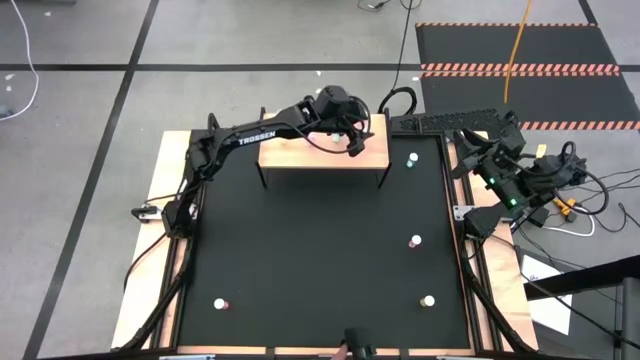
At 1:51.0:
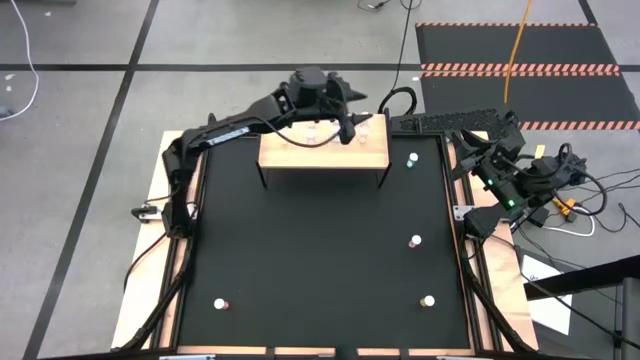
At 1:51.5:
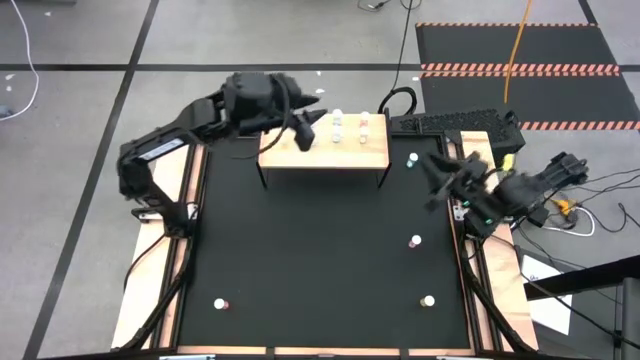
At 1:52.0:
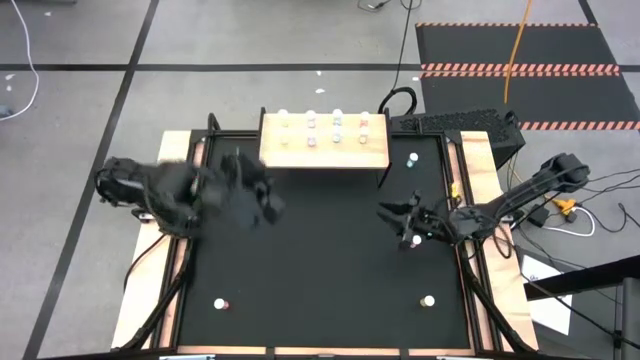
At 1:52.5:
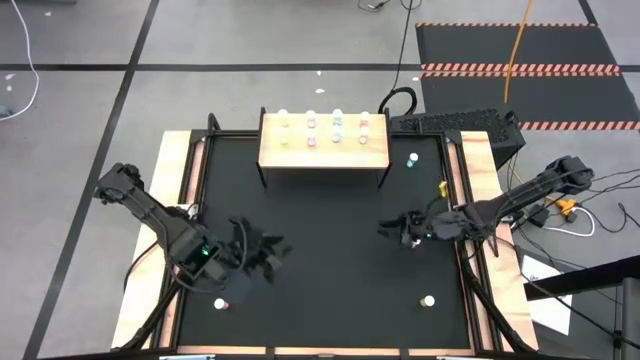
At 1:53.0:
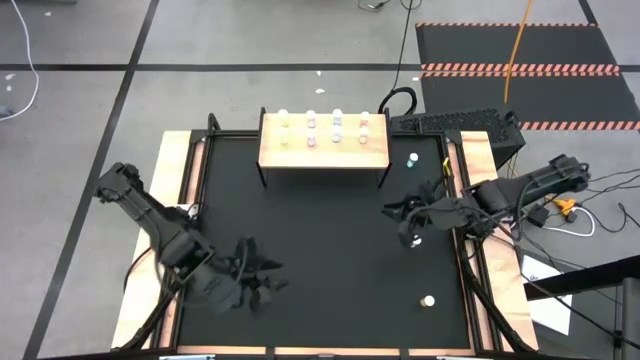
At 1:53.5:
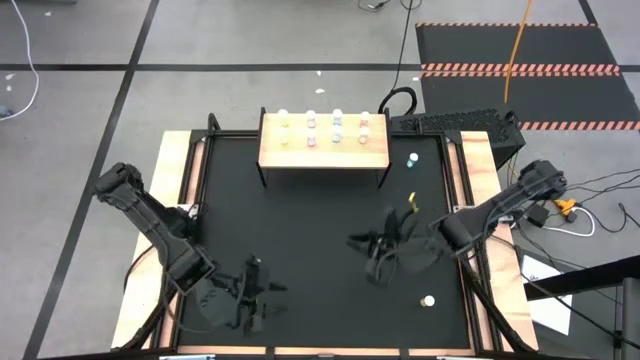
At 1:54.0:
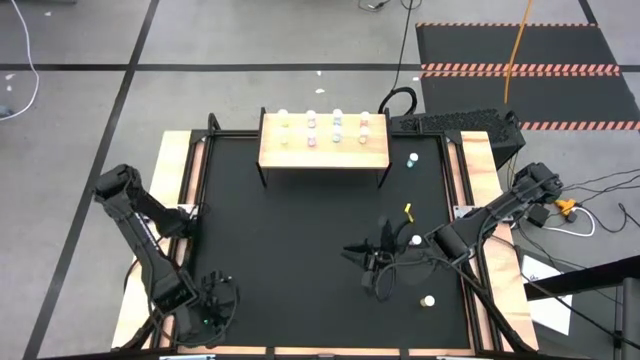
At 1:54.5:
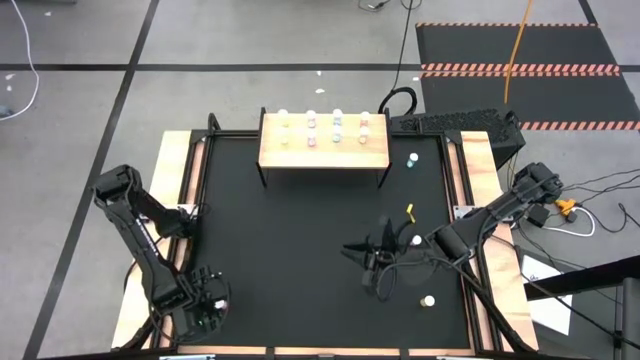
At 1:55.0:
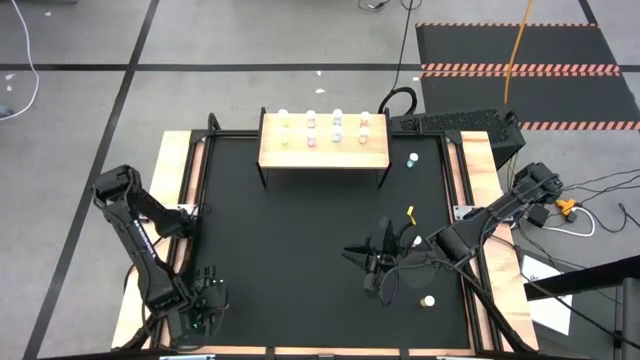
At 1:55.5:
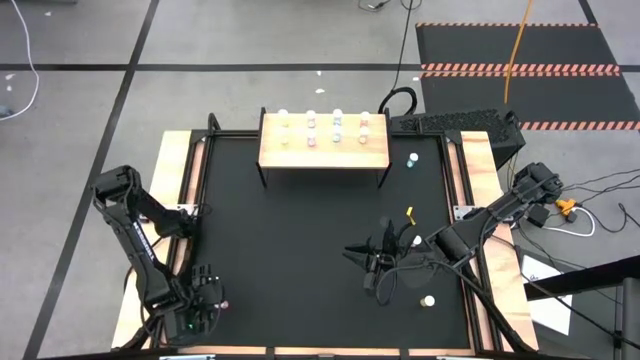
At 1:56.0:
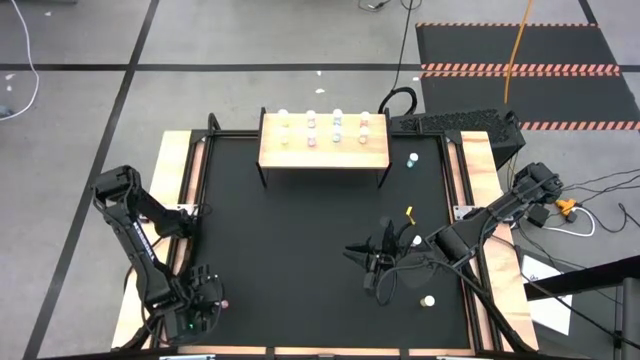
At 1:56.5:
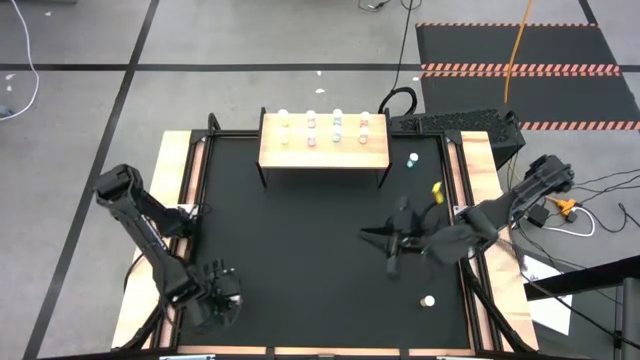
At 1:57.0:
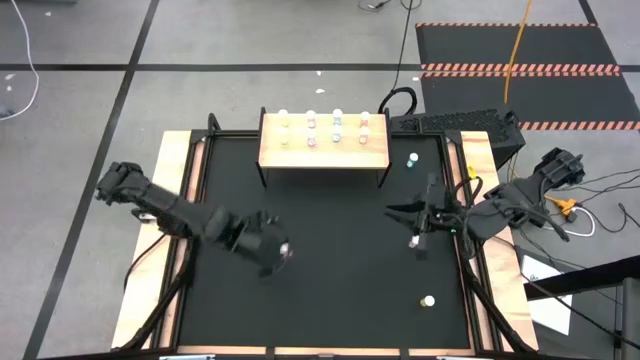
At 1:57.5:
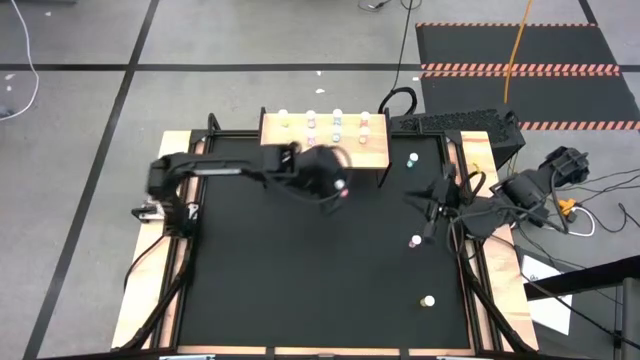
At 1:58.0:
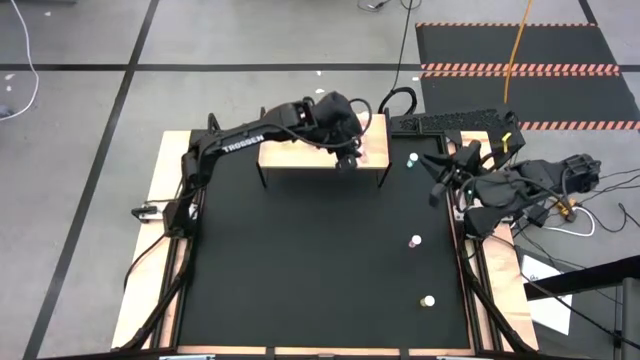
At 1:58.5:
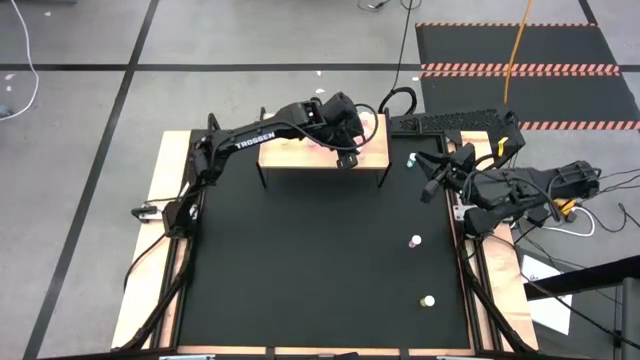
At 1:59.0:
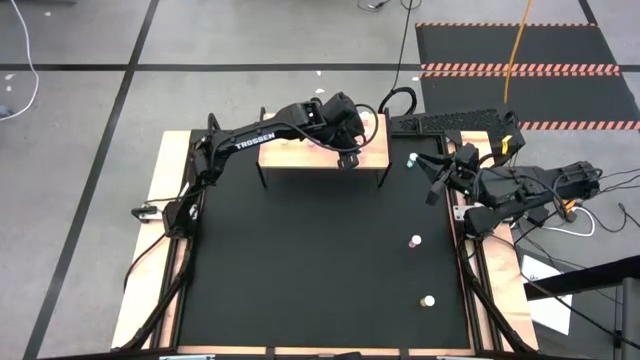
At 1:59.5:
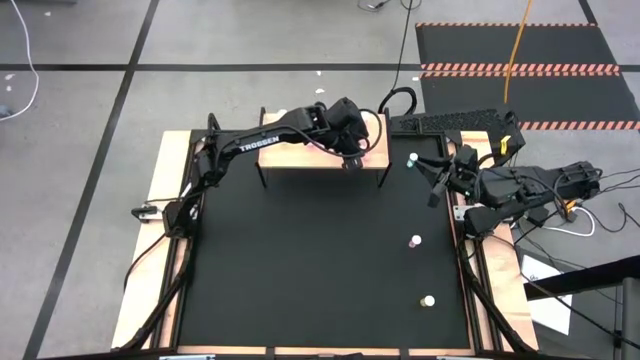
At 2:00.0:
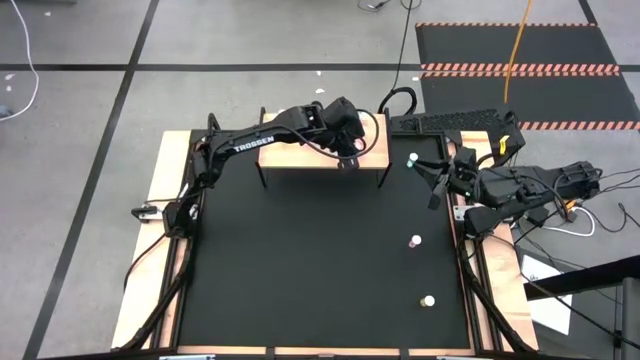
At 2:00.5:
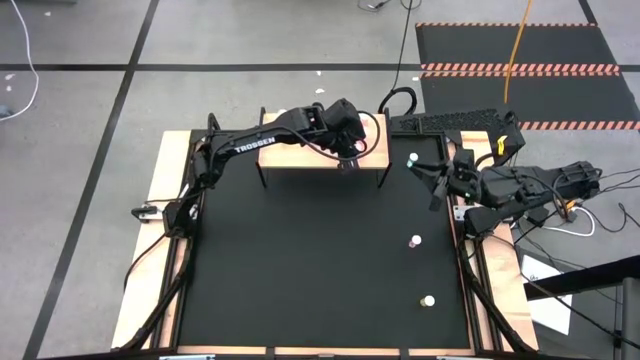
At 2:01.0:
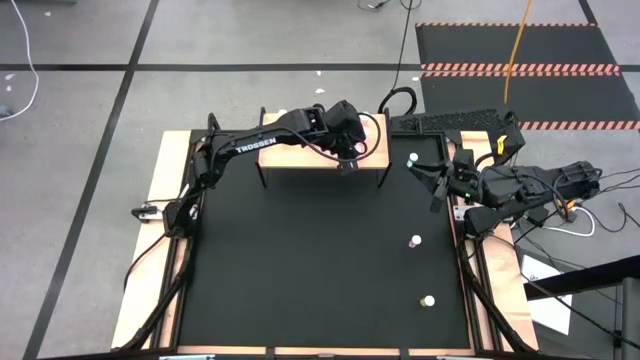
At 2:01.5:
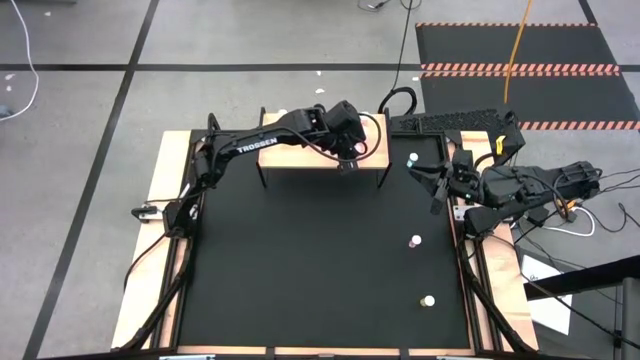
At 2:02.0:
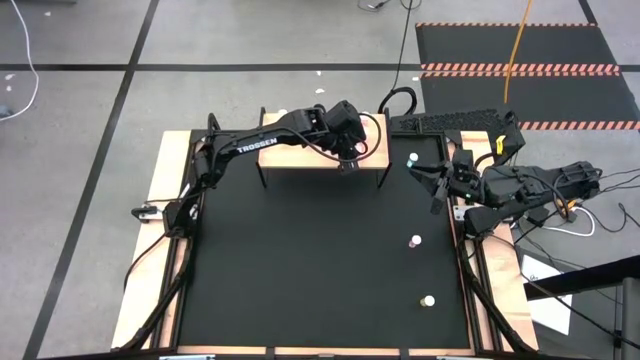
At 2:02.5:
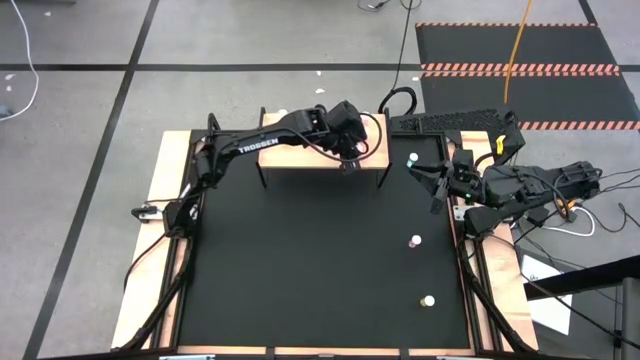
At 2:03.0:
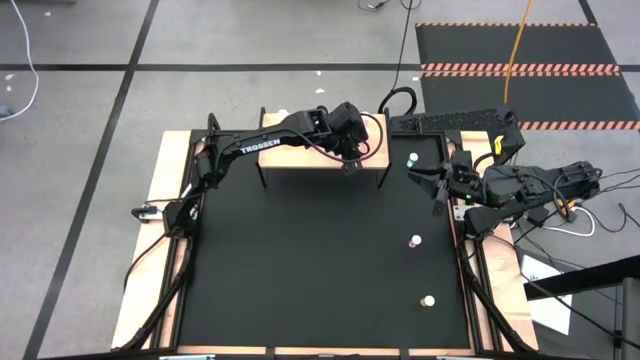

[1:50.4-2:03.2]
Task: Pick and place medicine bottles onto shelf by color
Put the orange pill bottle on the shelf aligned with the other orange pill bottle

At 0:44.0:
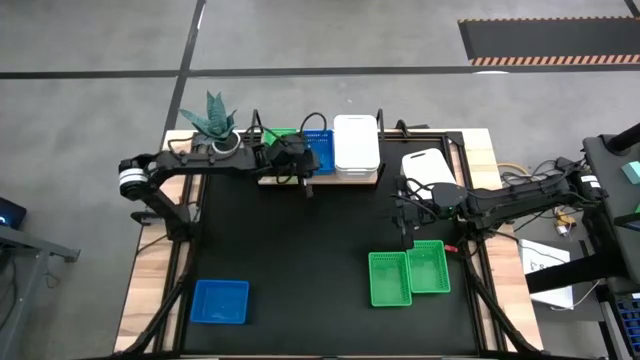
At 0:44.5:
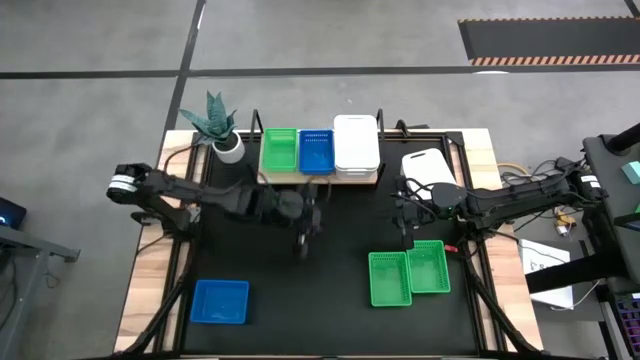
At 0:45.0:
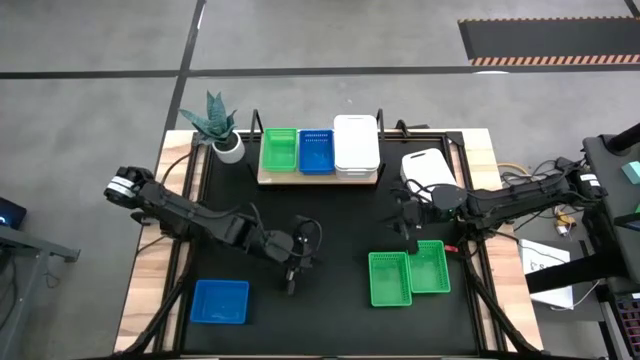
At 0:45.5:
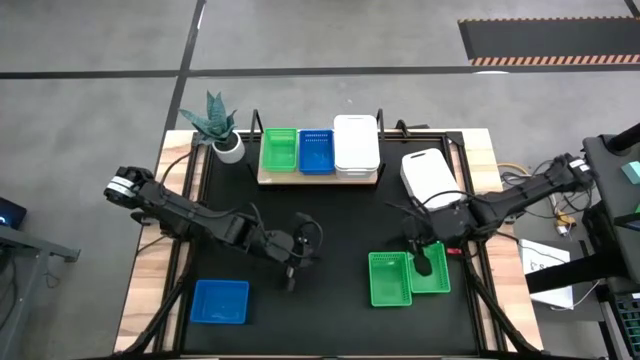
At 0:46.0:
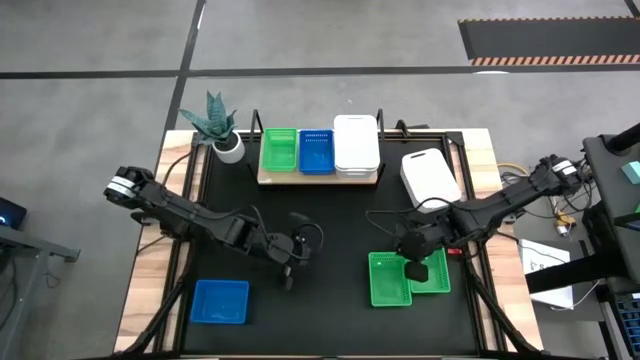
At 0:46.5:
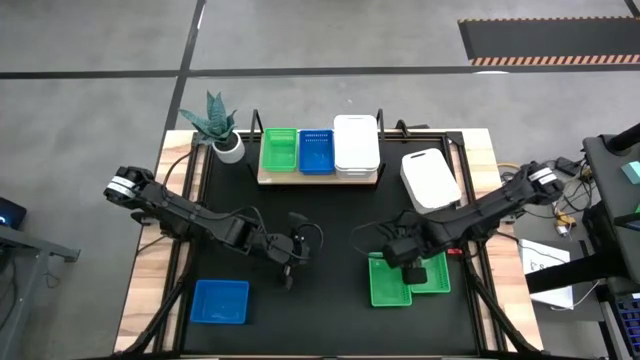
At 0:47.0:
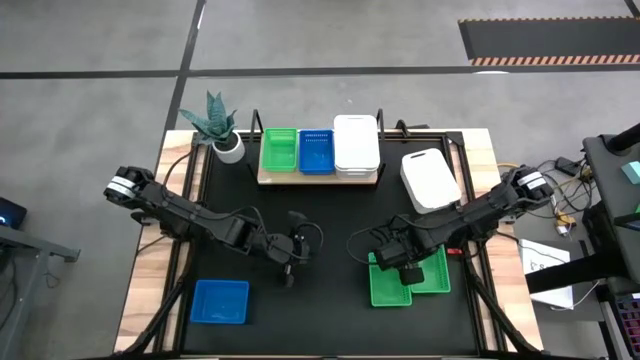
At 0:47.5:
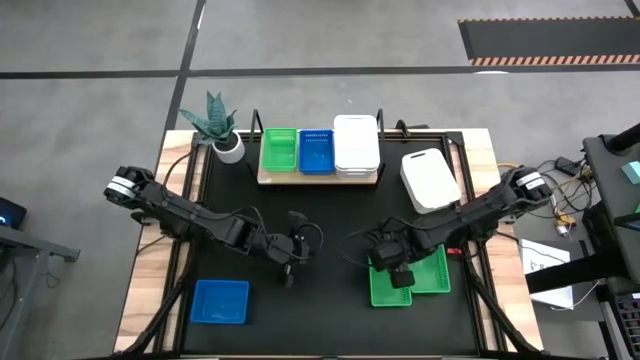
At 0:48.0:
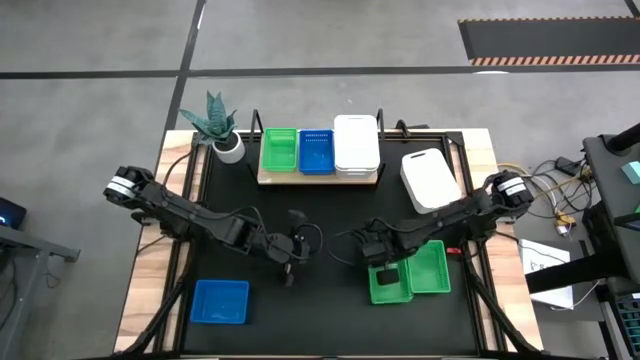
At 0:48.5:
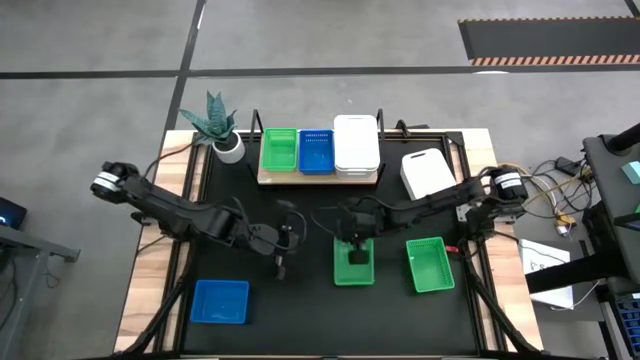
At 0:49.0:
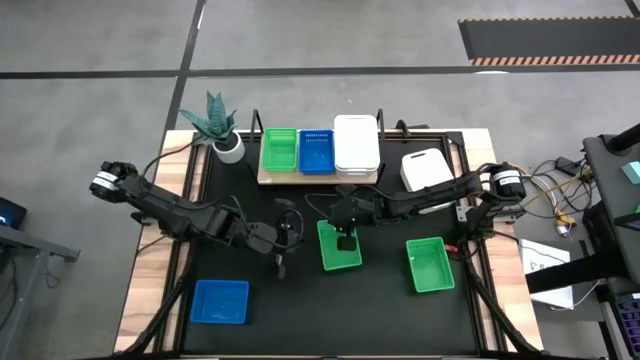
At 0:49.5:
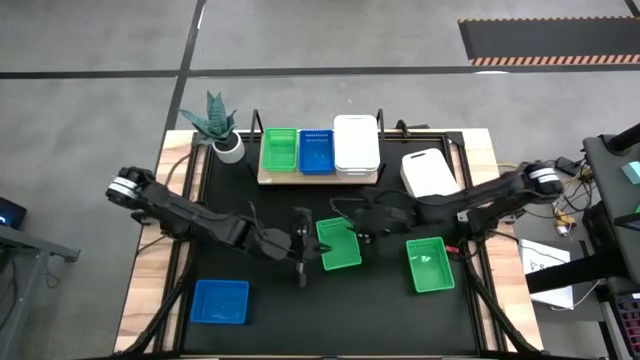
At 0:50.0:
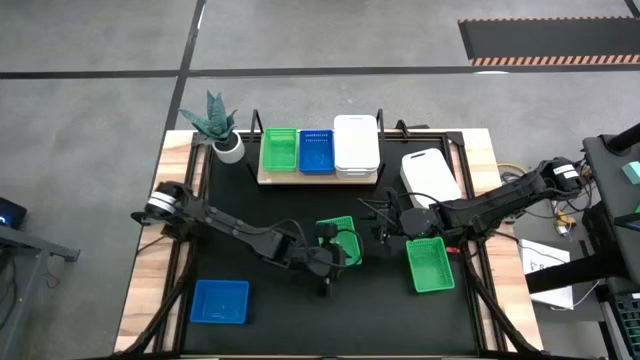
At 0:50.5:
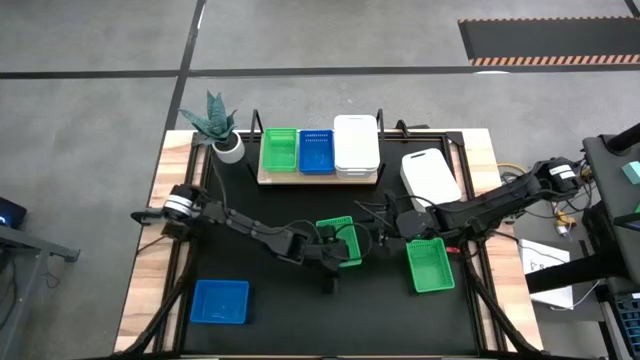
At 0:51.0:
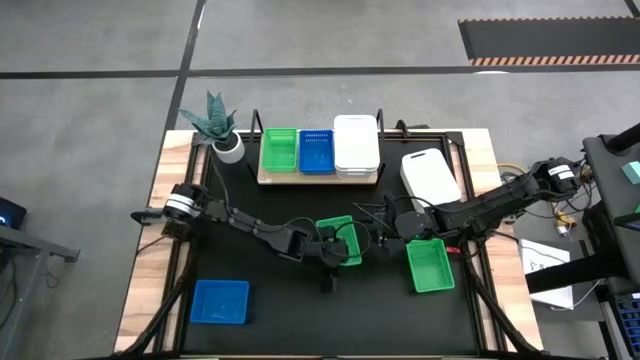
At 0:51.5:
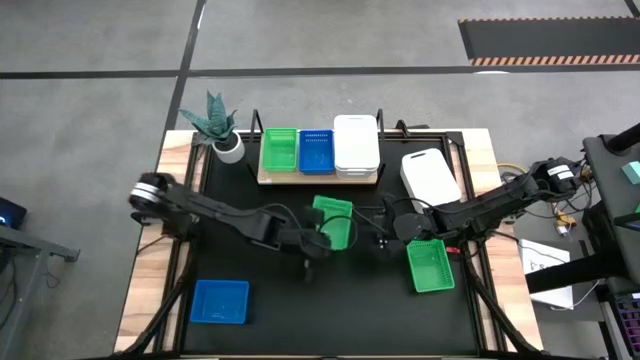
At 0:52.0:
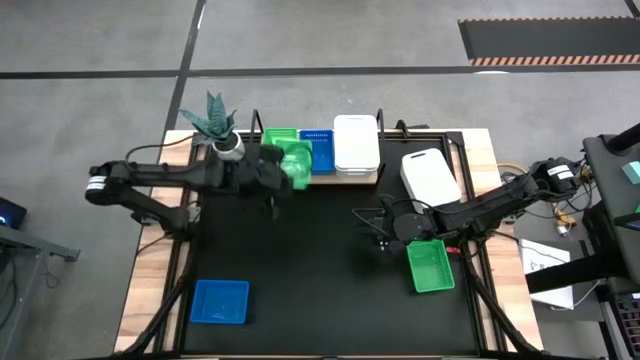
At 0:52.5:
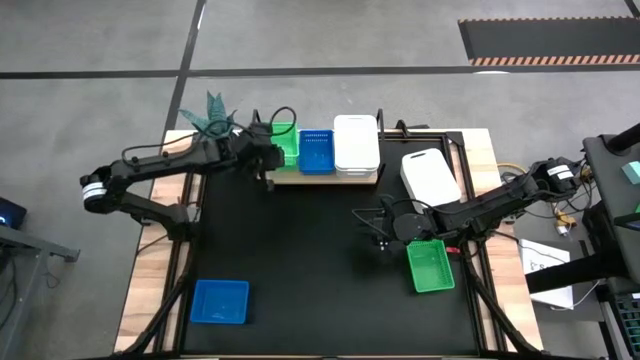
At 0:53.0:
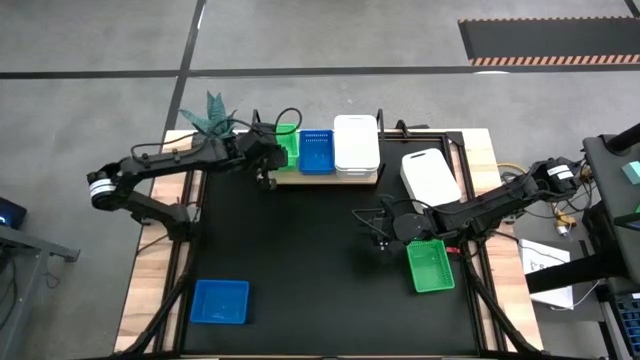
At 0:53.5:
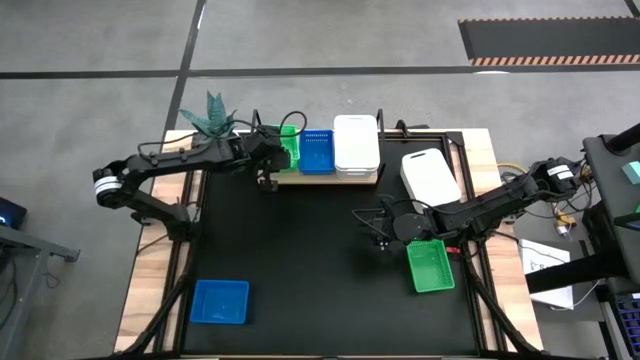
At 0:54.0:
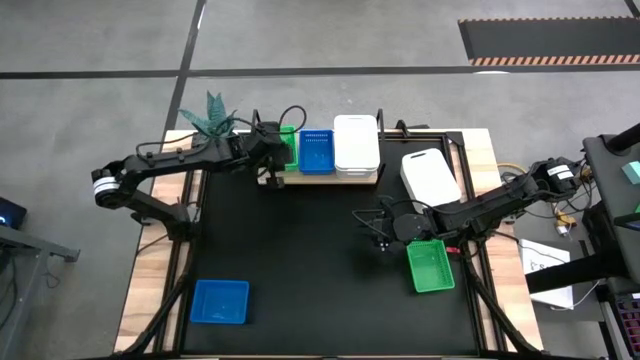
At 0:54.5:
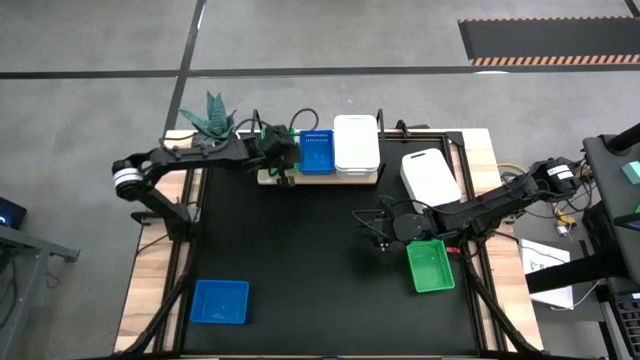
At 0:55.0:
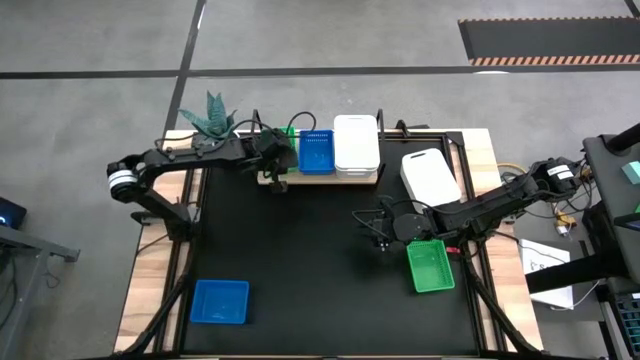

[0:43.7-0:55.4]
Task: Stack baskets on shelf by color
Stack the left green bin on top of the green bin on the shelf
